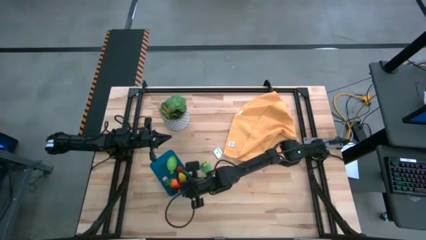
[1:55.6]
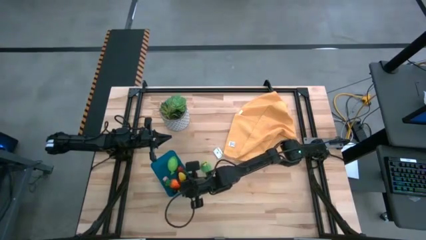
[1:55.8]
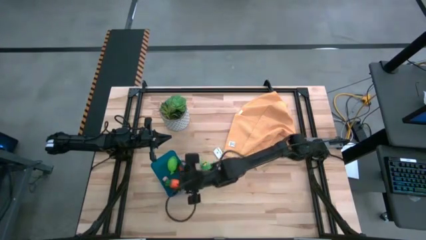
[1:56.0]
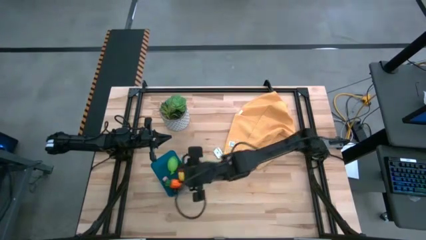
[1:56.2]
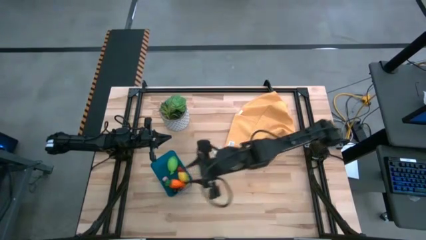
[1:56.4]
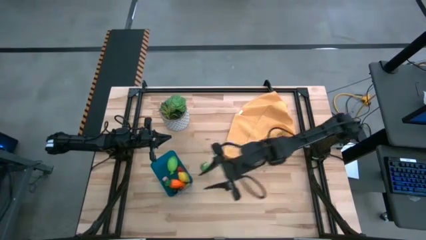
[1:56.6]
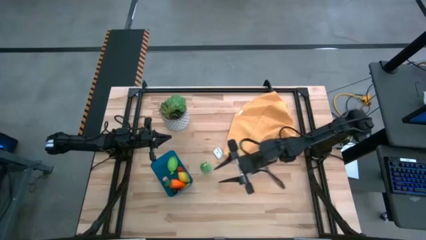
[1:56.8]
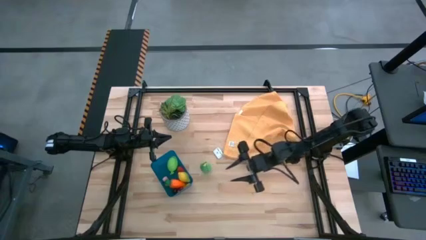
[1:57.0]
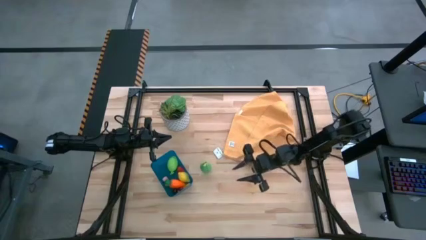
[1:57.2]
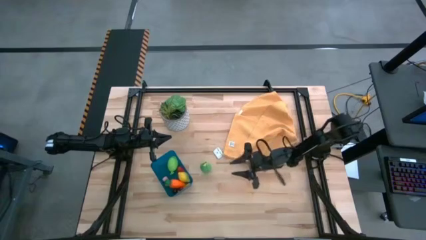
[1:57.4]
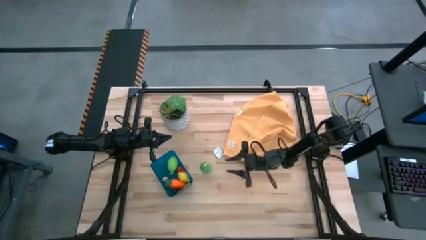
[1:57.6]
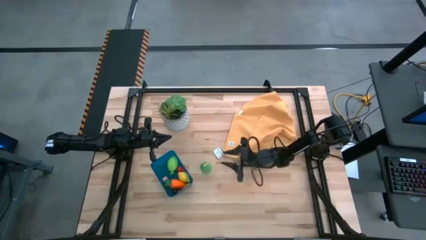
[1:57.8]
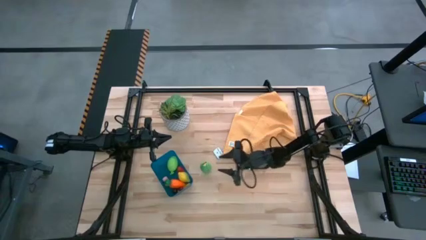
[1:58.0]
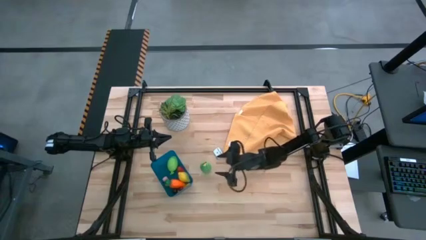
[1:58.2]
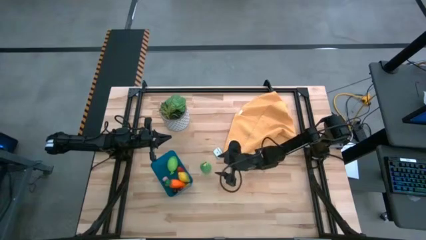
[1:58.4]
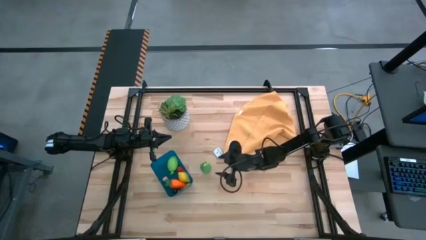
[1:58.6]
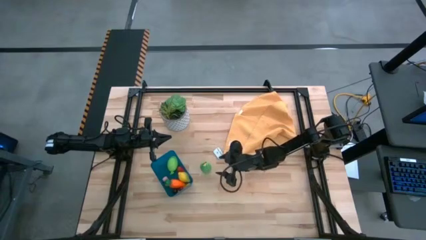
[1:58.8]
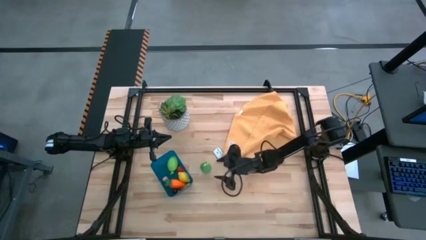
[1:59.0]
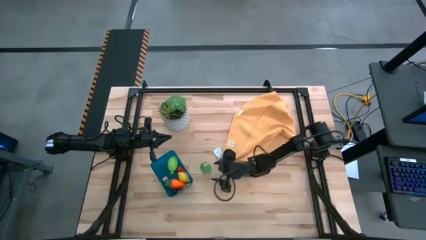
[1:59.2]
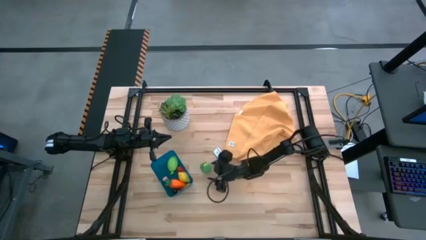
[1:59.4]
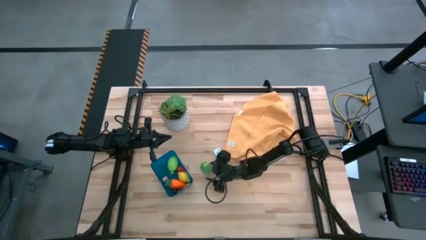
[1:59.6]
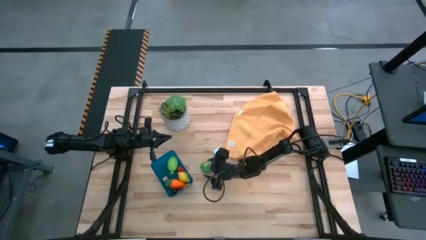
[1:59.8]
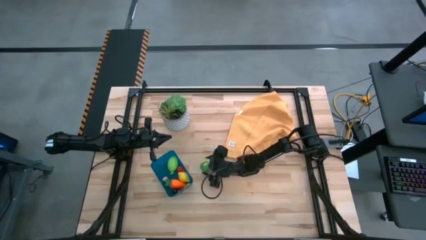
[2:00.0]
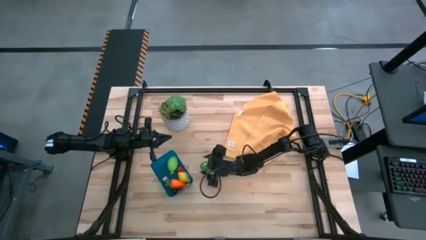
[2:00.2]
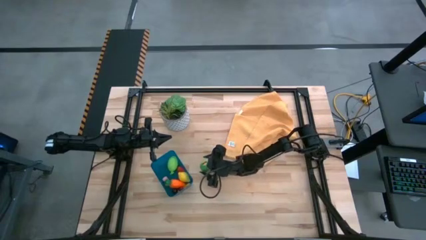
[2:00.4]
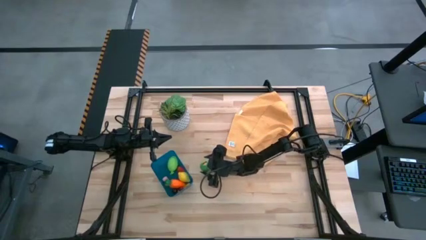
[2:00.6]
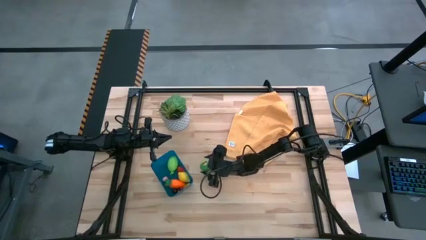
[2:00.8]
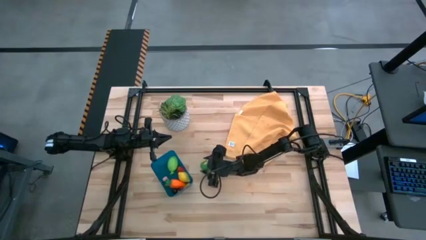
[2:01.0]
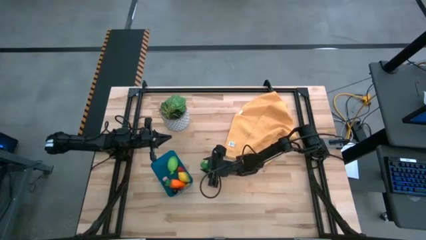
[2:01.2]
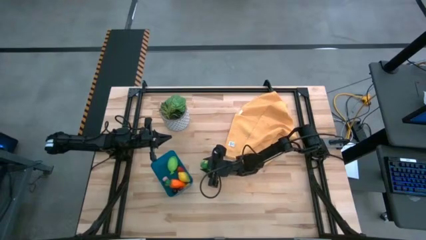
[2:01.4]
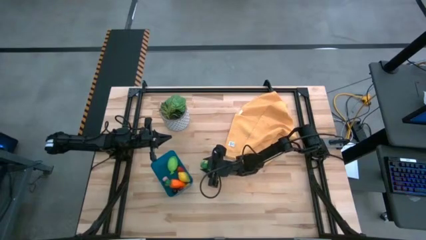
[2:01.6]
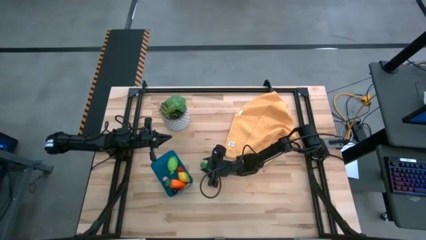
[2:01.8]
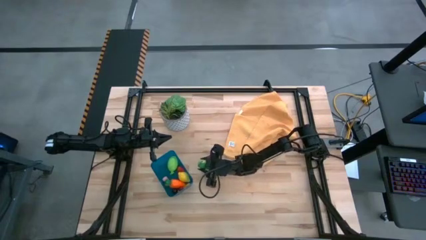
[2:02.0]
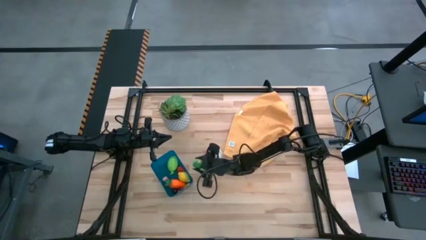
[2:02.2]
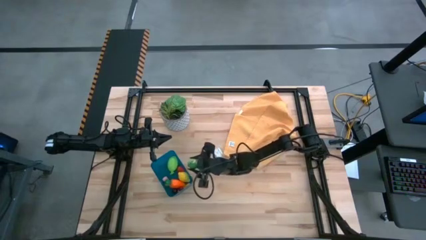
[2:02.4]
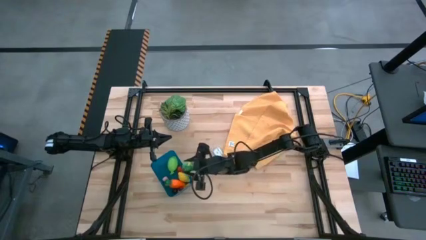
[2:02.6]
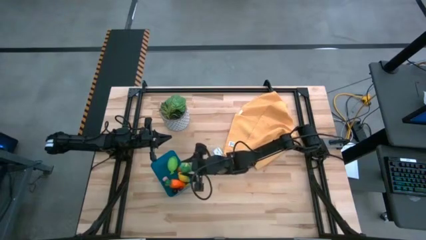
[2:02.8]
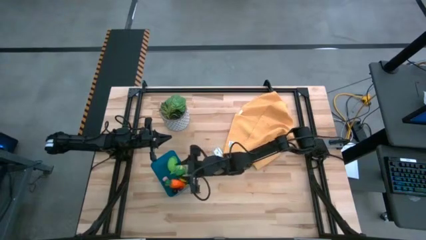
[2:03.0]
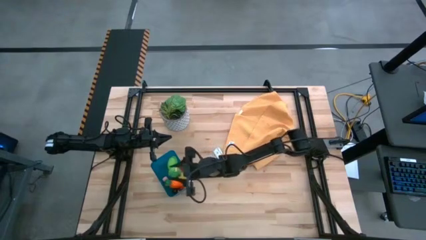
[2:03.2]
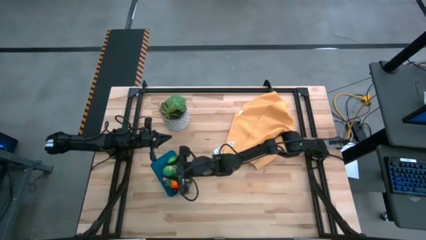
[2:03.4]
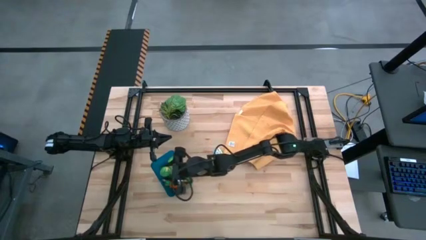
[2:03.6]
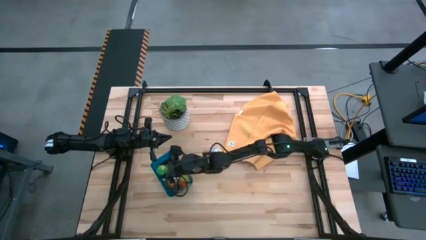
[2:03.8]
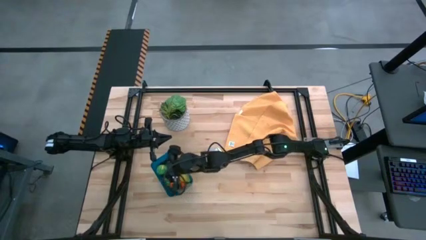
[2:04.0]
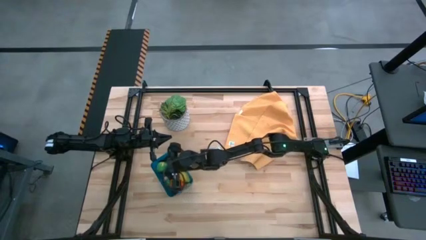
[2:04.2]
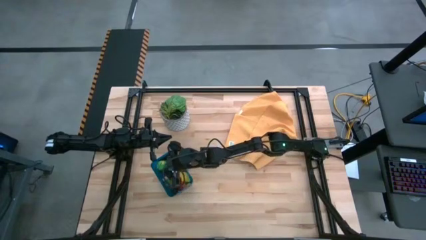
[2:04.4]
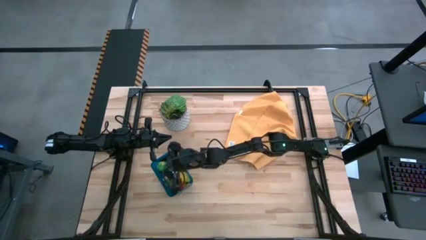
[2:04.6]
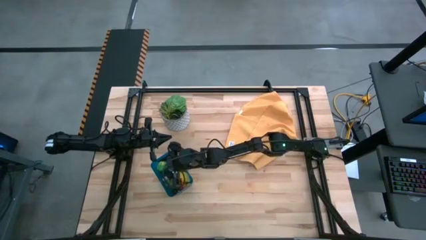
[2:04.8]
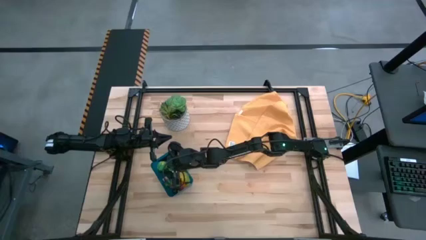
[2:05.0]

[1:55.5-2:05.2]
Task: Pick and placing Produce into tupperware
Put the green corn into the blue bin

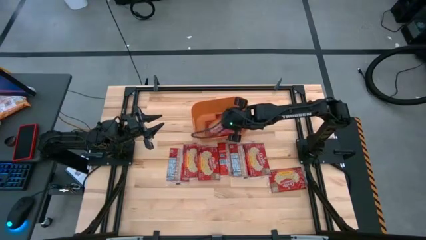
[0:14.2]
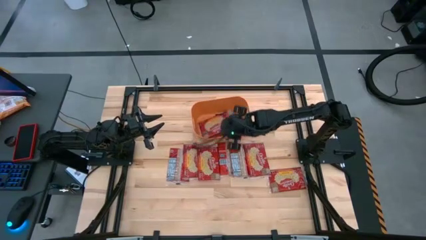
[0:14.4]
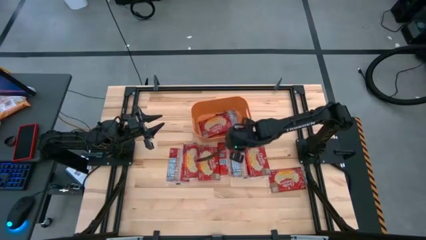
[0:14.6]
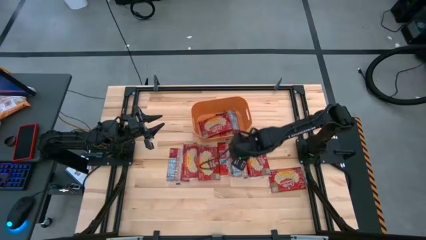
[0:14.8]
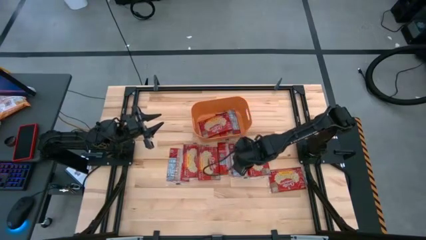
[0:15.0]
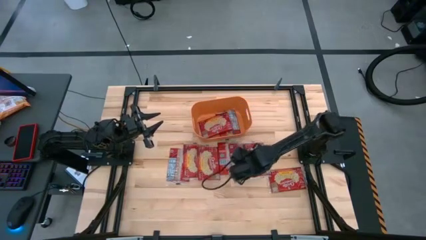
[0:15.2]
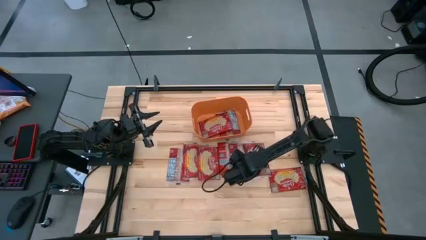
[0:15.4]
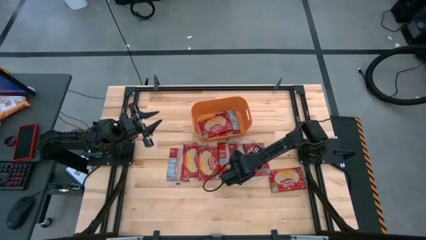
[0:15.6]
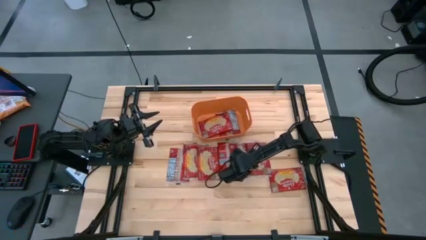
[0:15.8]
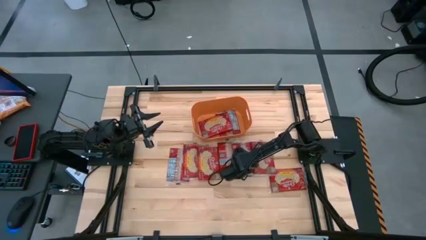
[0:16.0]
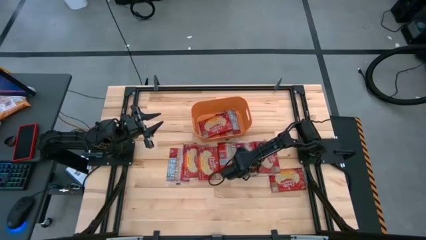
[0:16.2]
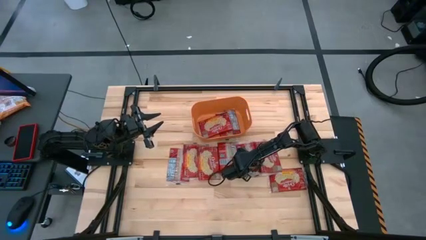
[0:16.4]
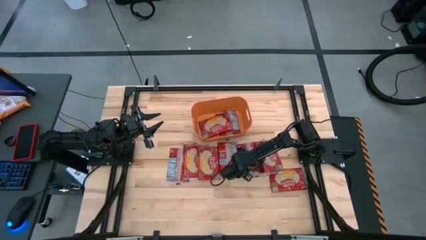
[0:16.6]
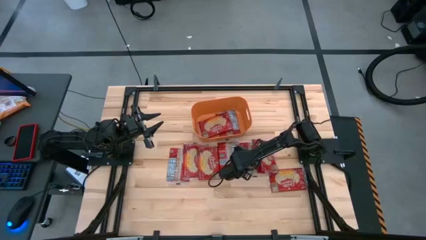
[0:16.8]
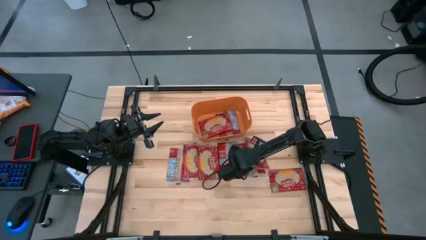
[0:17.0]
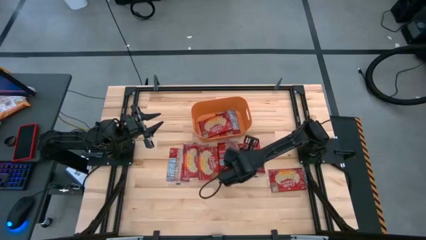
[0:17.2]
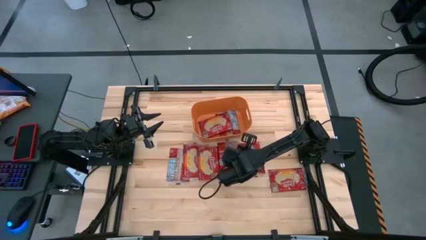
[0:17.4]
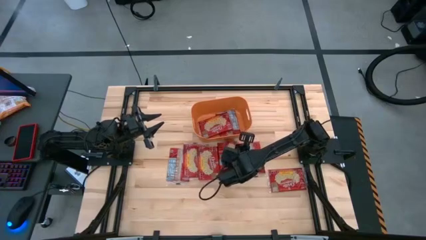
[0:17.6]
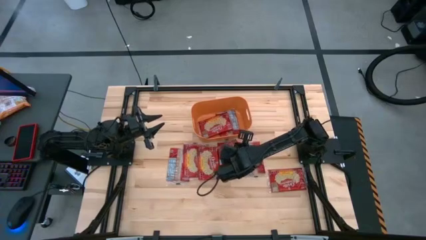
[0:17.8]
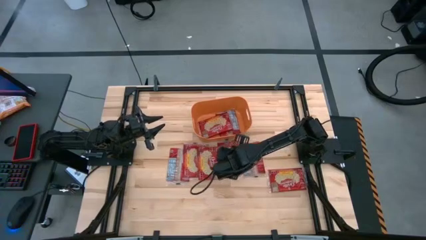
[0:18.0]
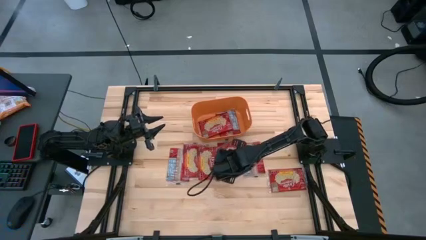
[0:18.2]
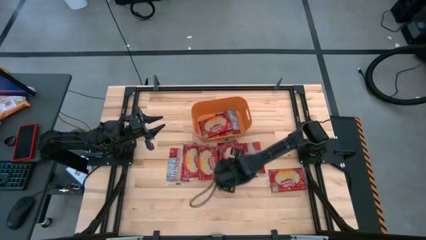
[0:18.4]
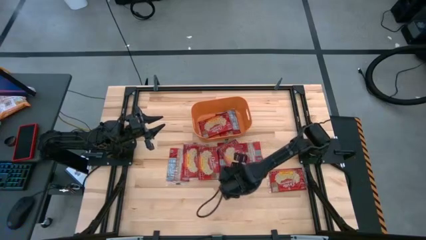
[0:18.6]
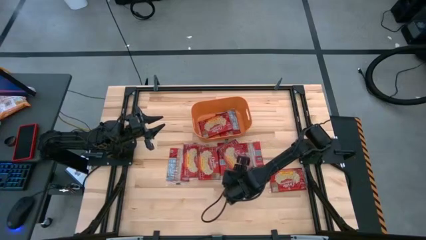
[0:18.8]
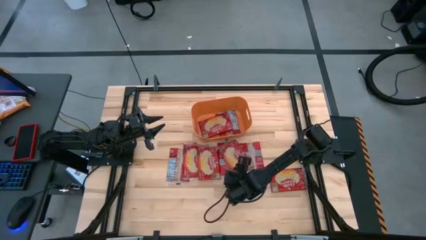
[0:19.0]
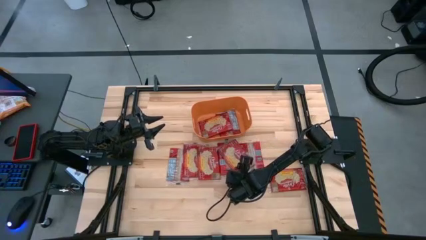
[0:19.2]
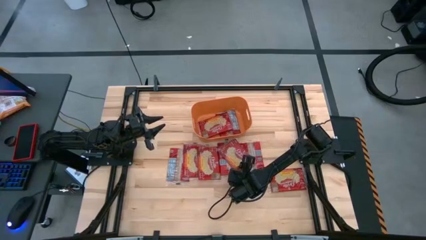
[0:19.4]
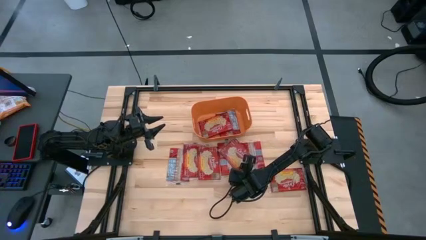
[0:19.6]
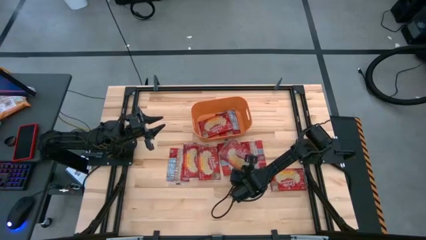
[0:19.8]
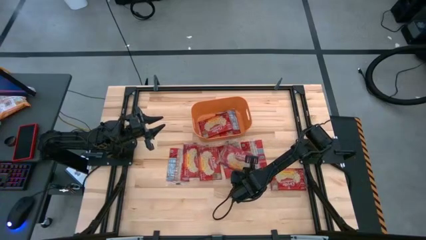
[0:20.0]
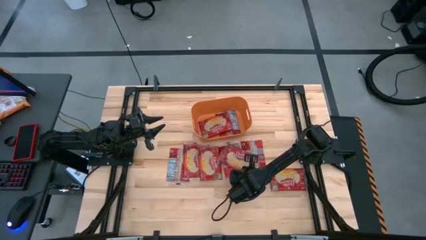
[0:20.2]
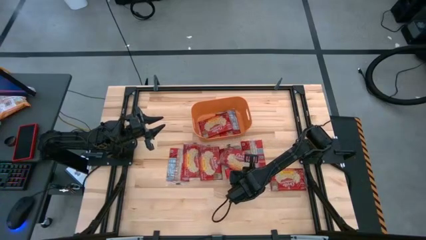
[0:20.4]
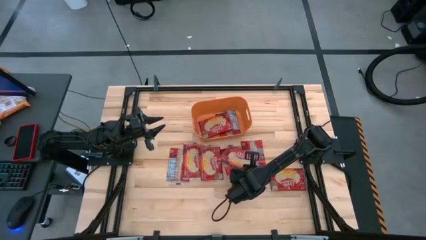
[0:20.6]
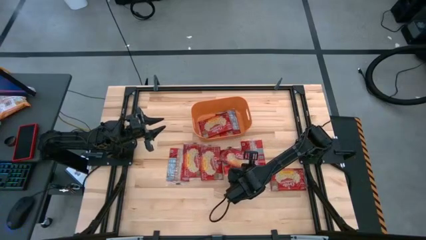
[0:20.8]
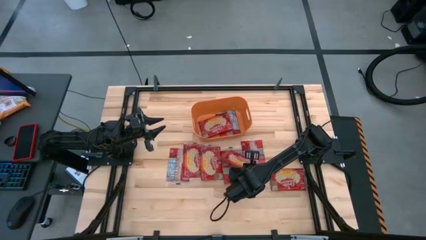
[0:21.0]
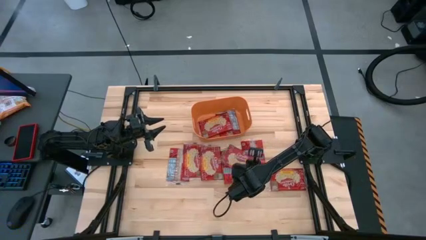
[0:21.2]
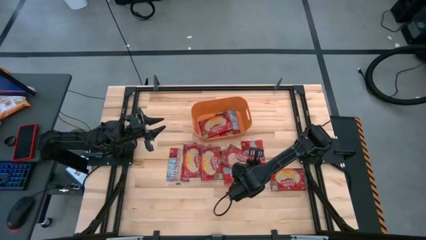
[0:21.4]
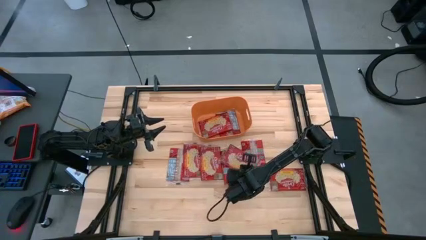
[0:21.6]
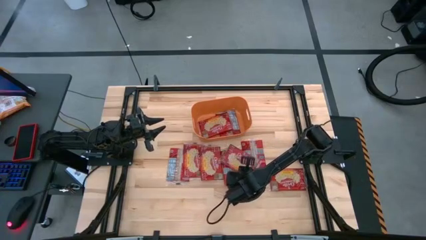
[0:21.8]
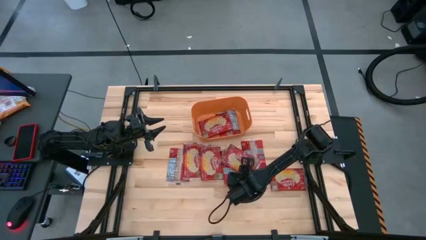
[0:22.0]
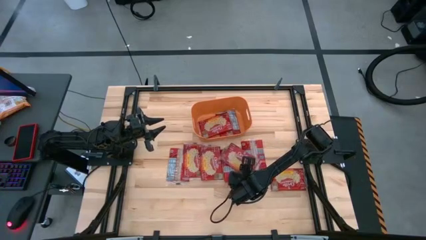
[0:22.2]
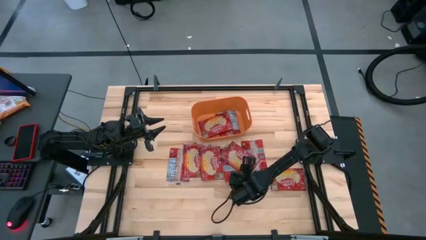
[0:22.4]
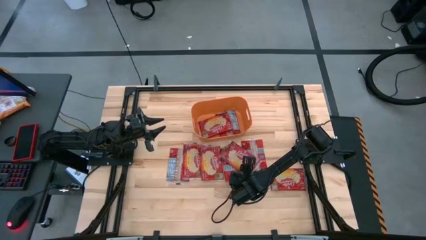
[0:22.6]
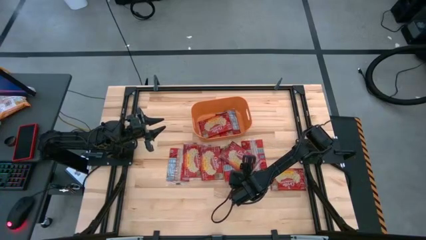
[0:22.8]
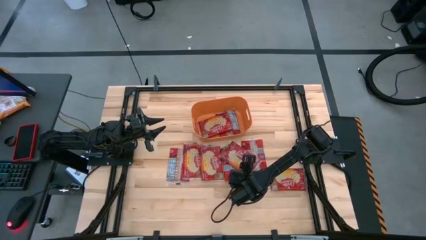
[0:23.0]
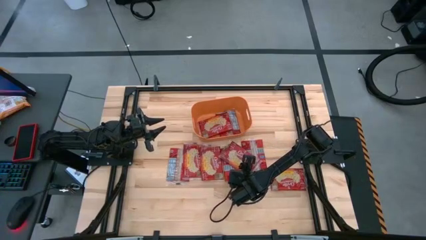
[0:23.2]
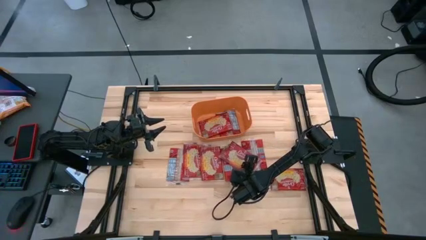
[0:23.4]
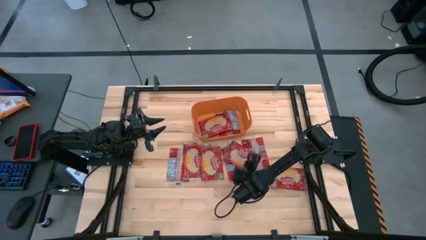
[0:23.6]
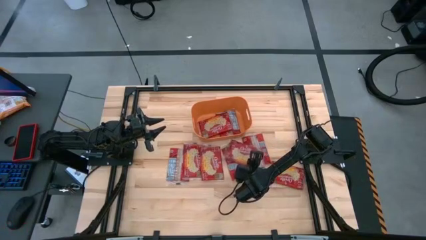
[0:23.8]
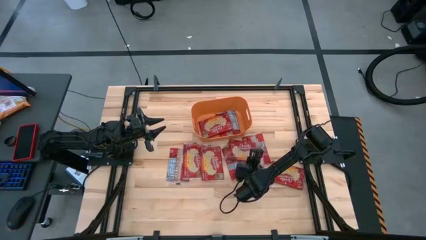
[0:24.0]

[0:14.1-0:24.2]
Task: Sort popcorn bags into baskets
Put the red popcorn bag into the orange bin
